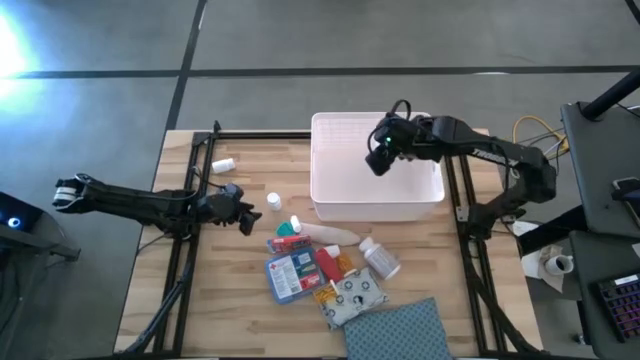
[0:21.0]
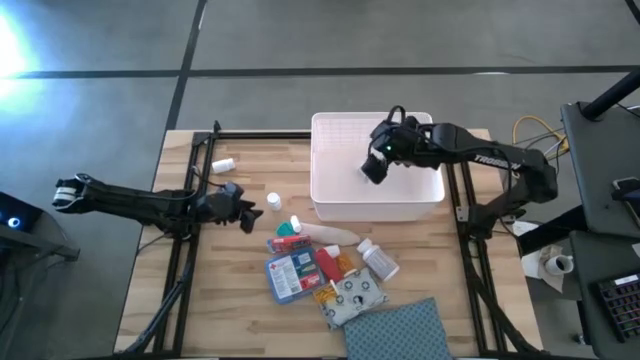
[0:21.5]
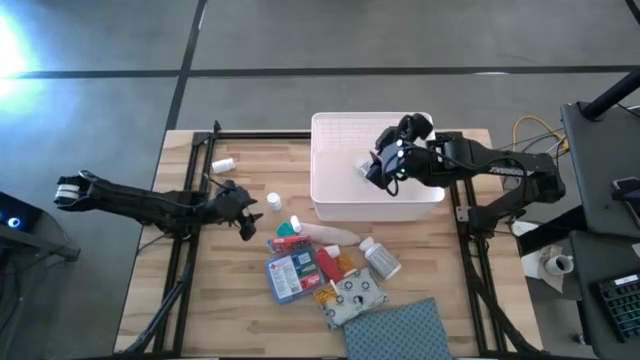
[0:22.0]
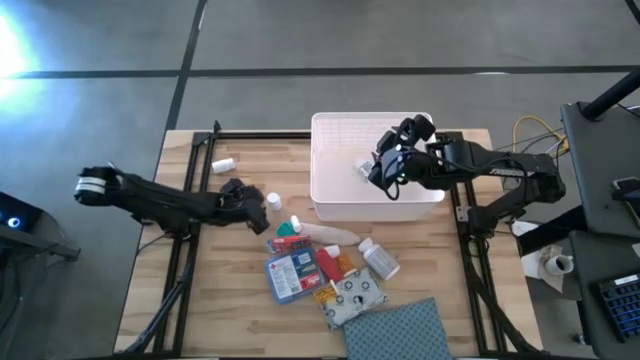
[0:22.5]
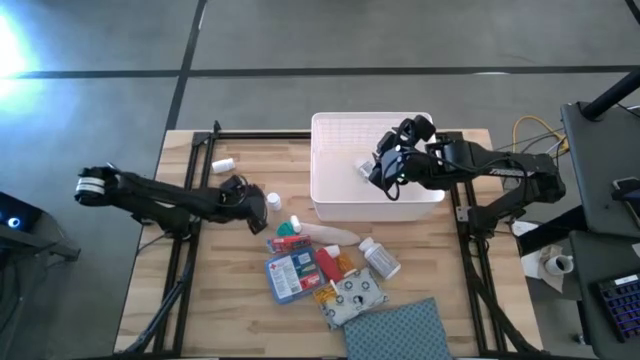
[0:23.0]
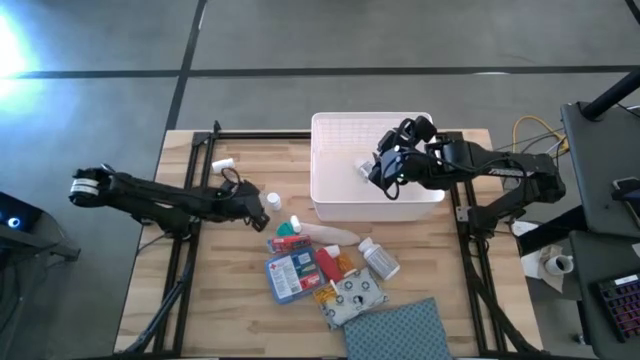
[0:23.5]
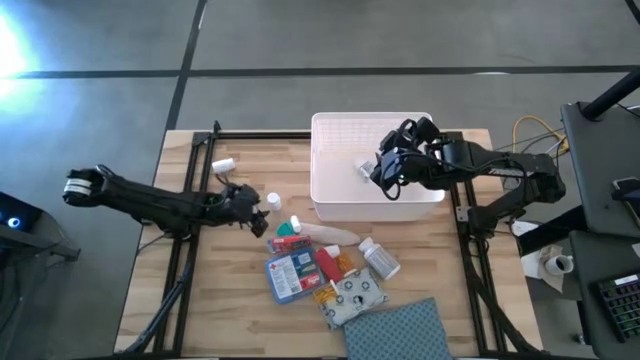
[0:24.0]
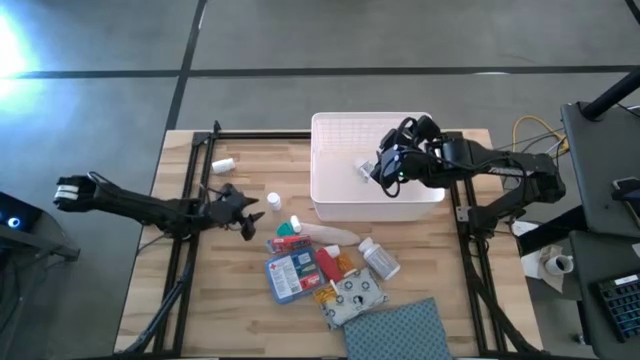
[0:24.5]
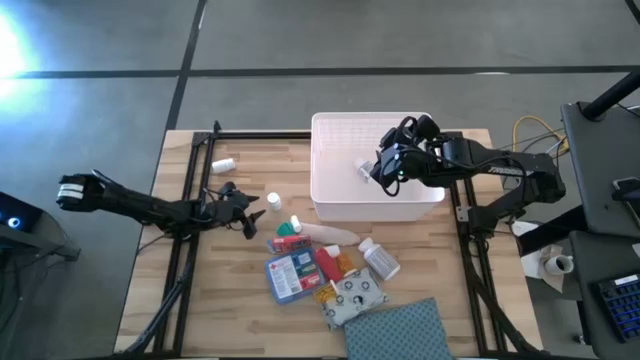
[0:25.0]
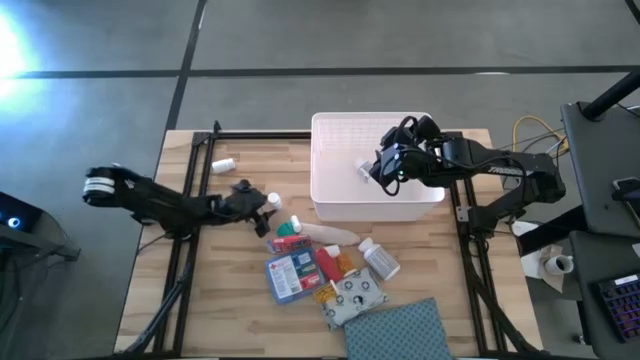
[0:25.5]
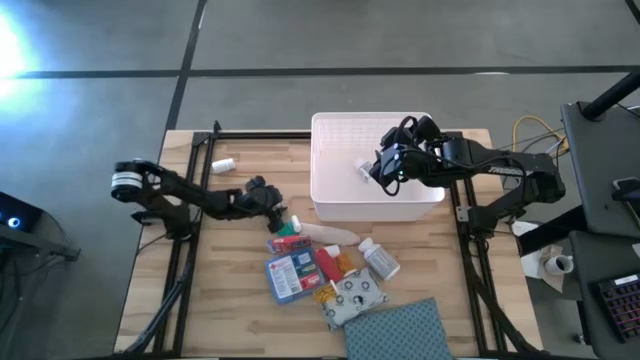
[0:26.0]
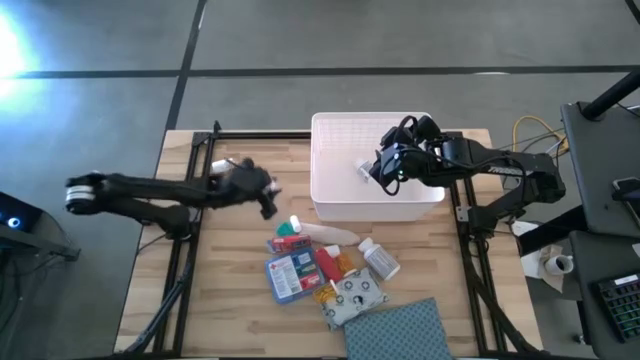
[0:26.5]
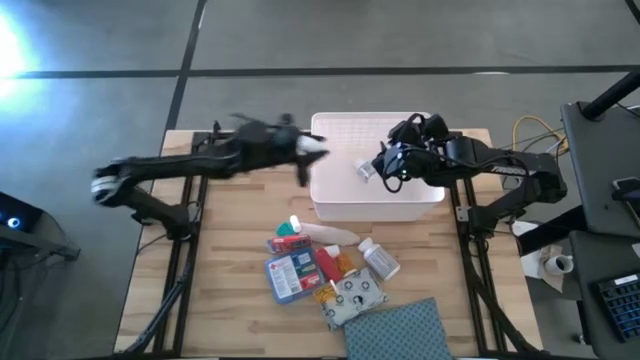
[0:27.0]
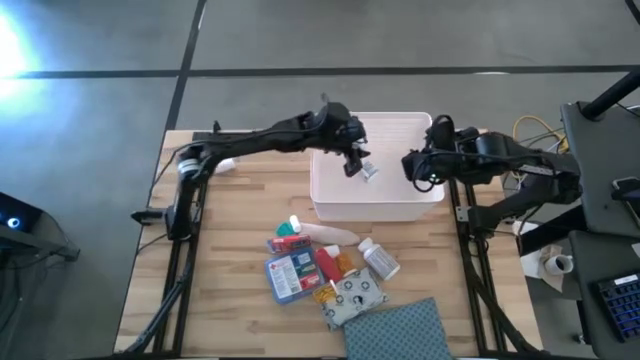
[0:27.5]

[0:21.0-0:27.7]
Task: Pick & place medical supplies in basket/bin
Put the white pill bottle into the white bin

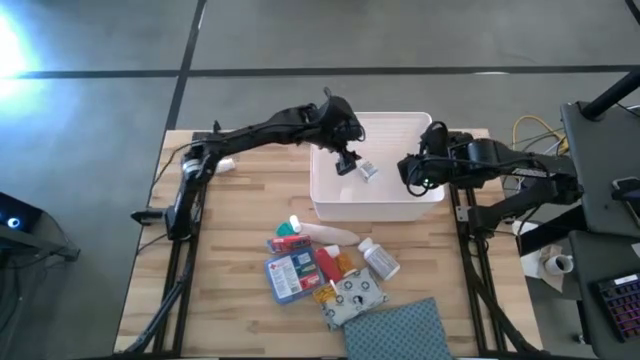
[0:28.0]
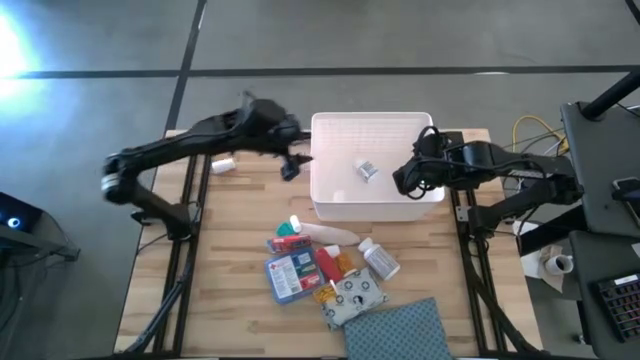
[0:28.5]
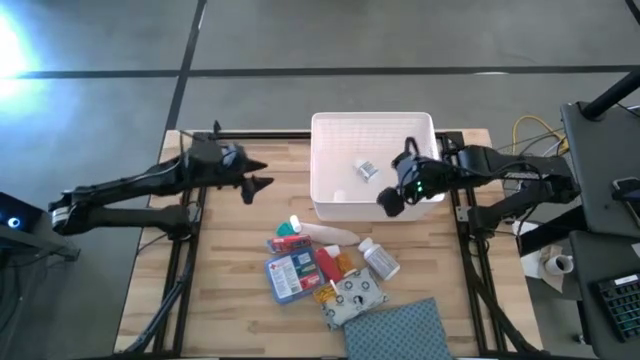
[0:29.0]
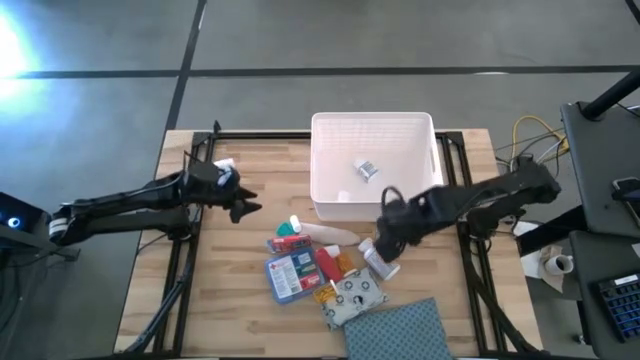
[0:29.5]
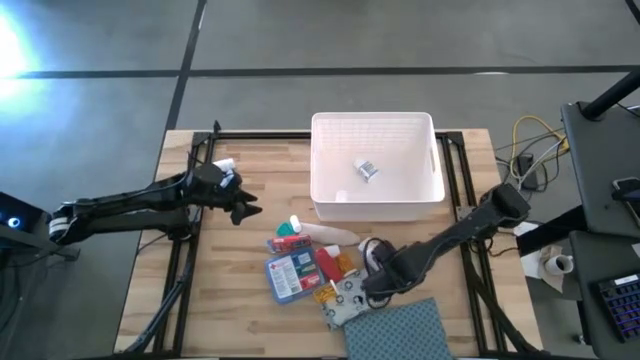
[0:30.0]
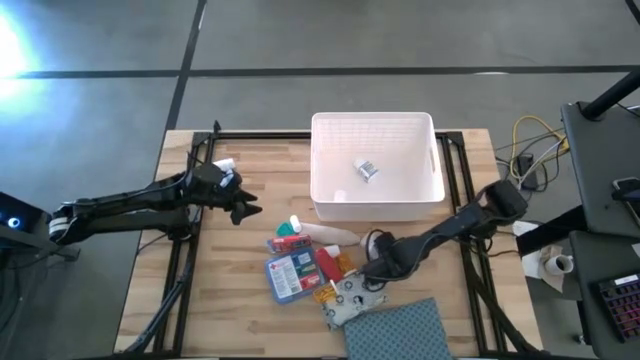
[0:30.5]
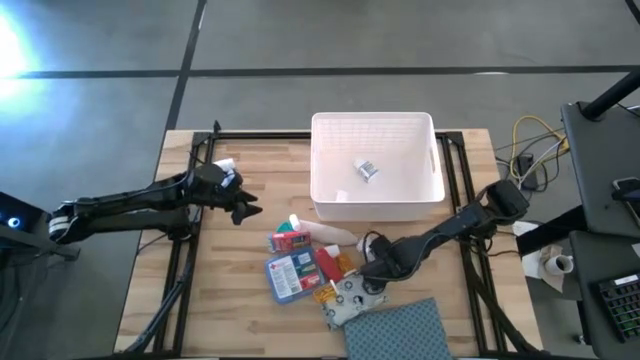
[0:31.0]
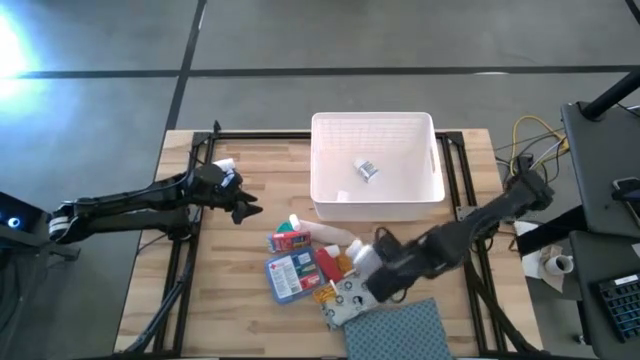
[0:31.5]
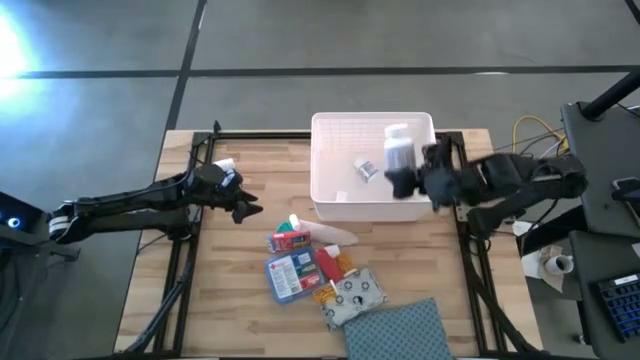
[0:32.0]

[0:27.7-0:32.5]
Put the white pill bottle into the white bin

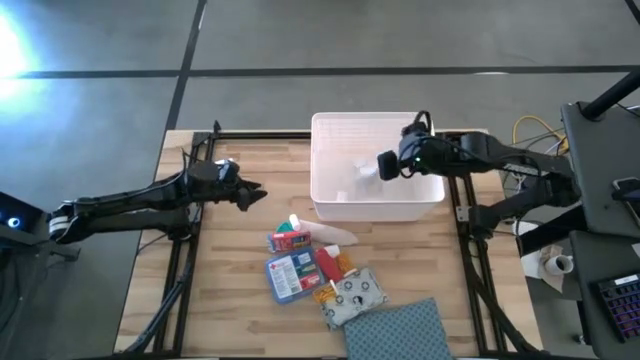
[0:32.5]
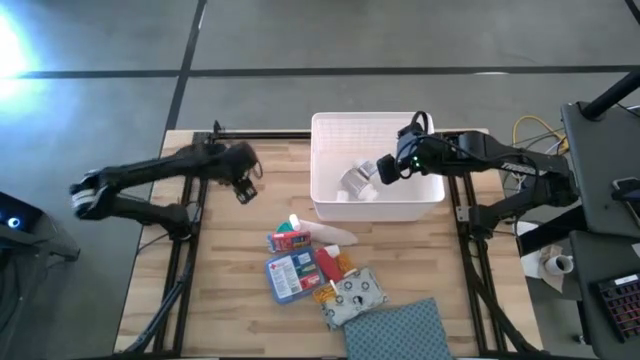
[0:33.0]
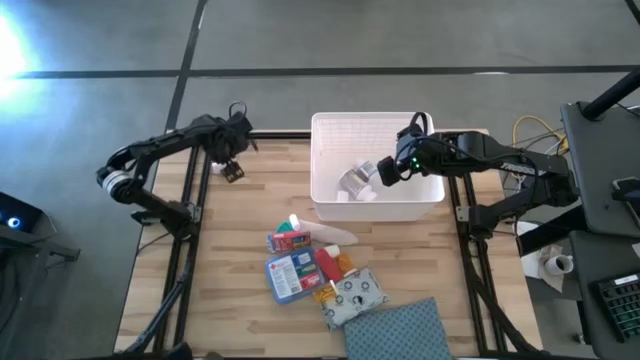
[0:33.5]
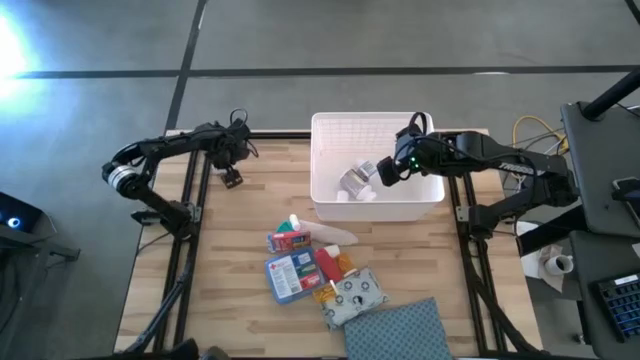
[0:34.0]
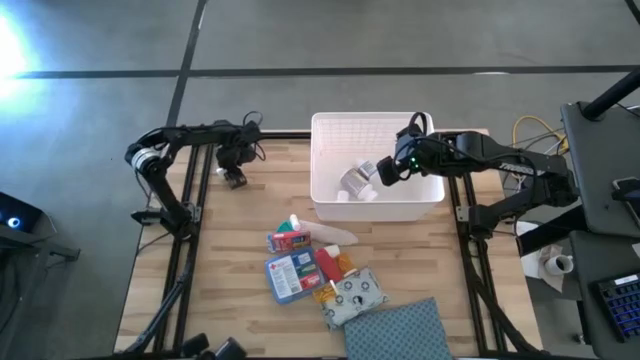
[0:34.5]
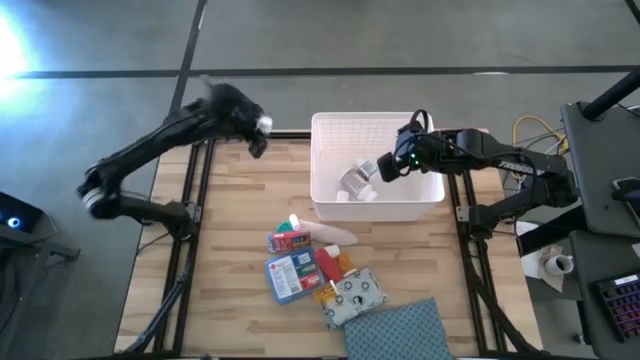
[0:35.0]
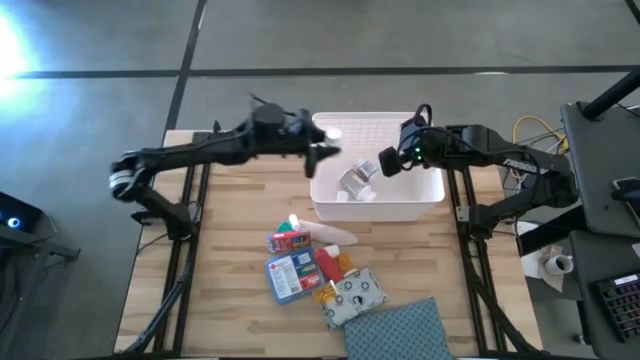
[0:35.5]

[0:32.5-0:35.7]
Put the white pill bottle into the white bin

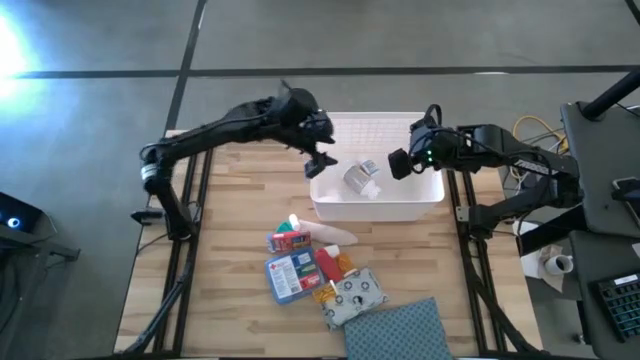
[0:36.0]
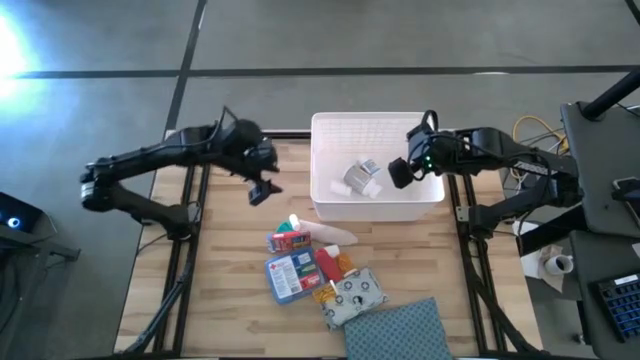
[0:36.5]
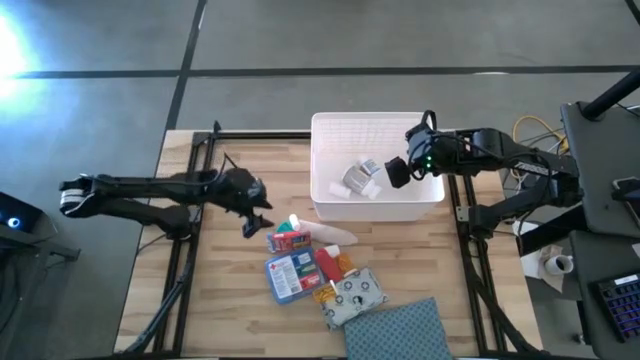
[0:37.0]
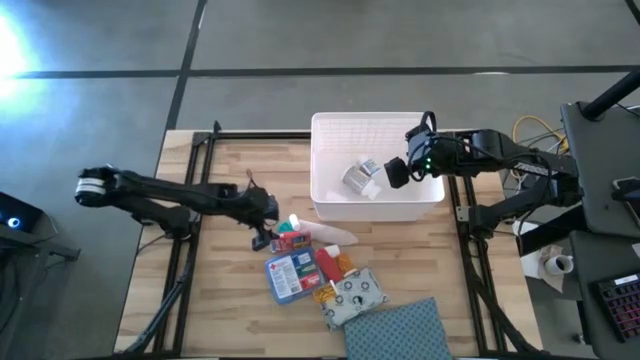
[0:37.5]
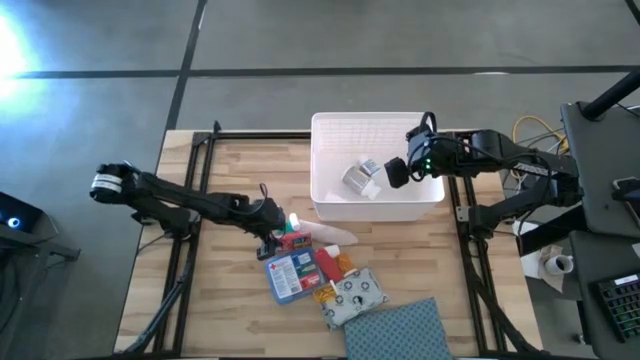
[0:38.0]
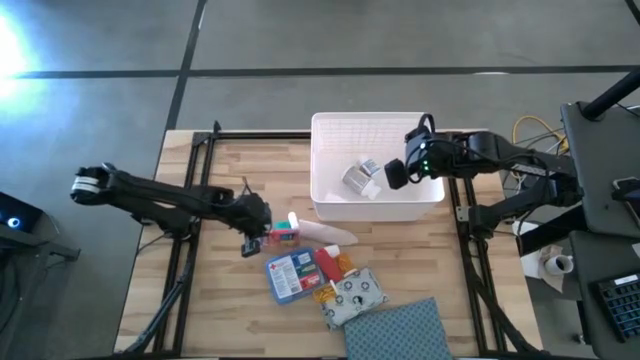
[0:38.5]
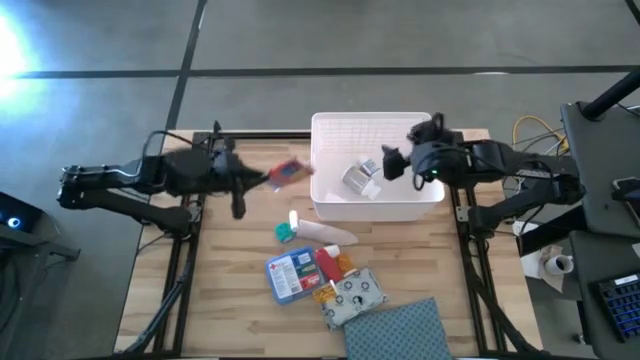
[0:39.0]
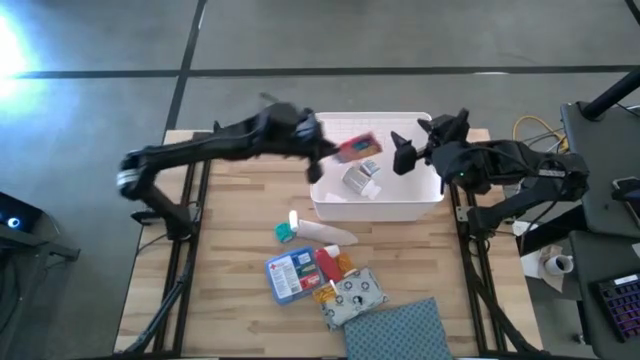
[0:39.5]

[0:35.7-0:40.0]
Put the red medicine pack into the white bin

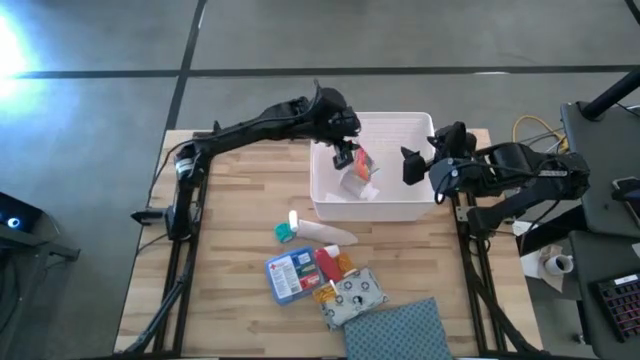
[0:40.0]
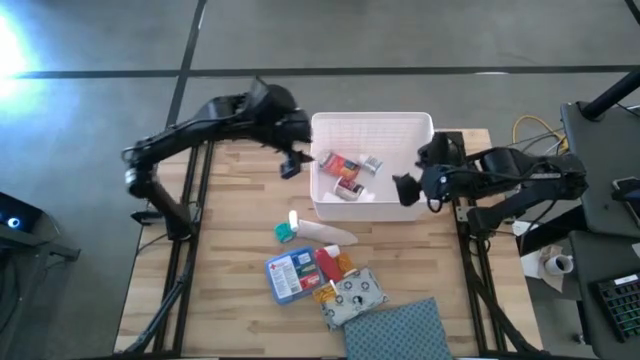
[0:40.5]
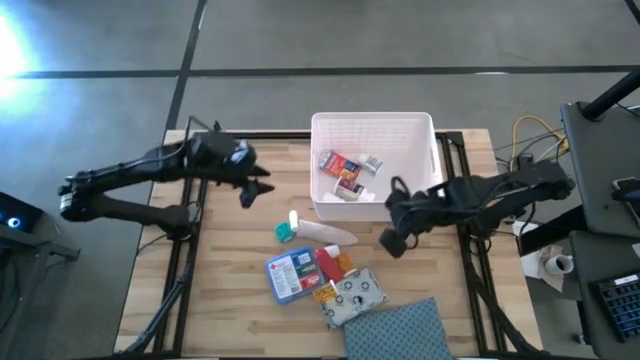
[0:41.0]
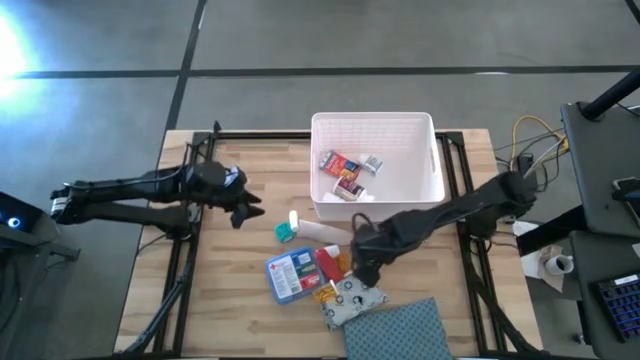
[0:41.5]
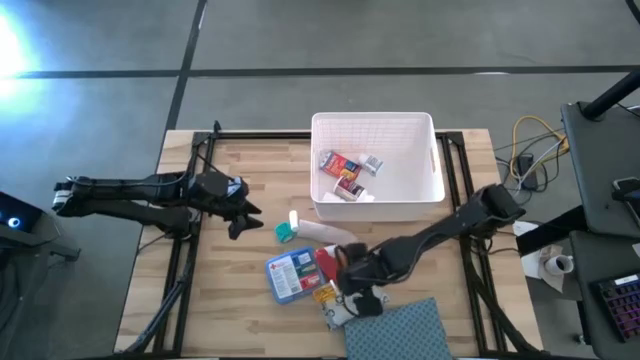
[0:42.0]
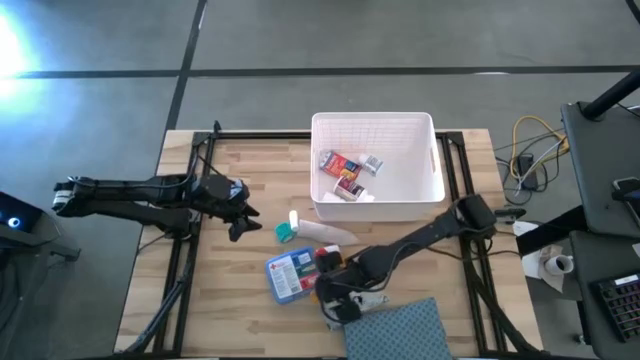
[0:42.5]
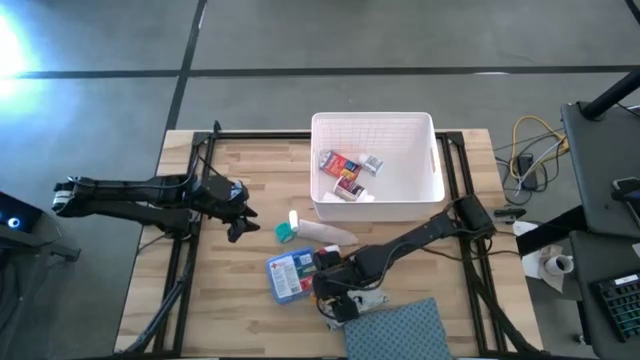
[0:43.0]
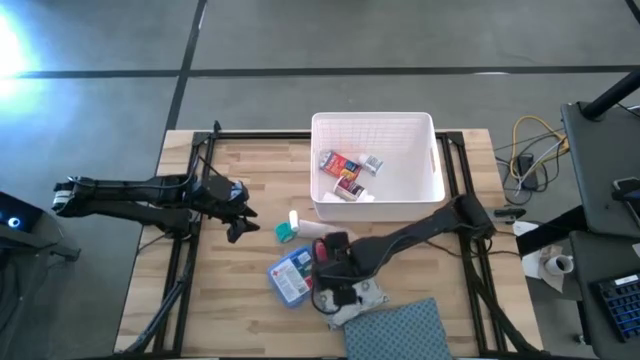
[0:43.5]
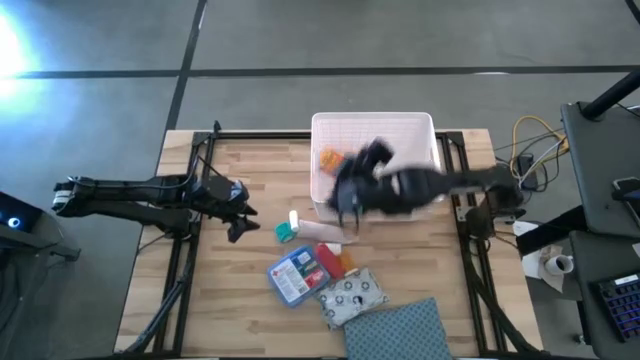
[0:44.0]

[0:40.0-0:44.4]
Put the orange pill bottle into the white bin
